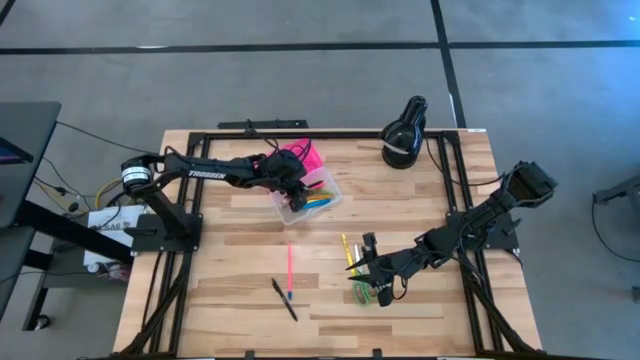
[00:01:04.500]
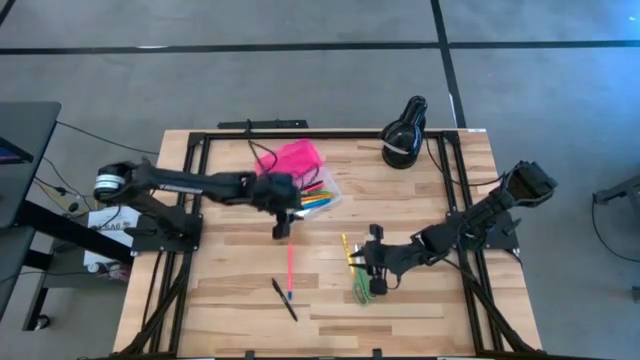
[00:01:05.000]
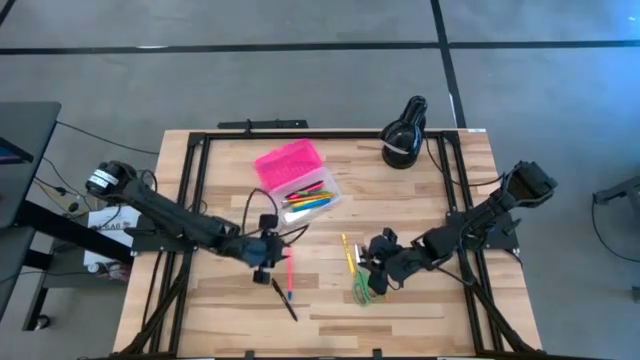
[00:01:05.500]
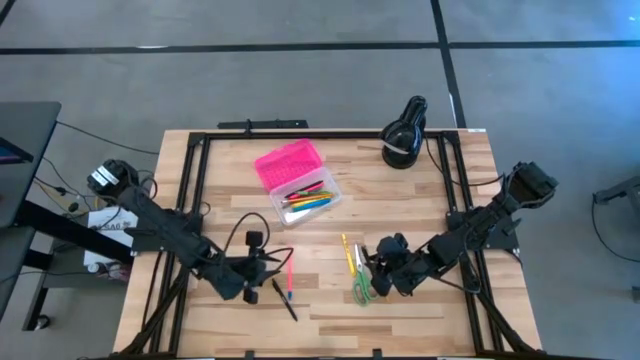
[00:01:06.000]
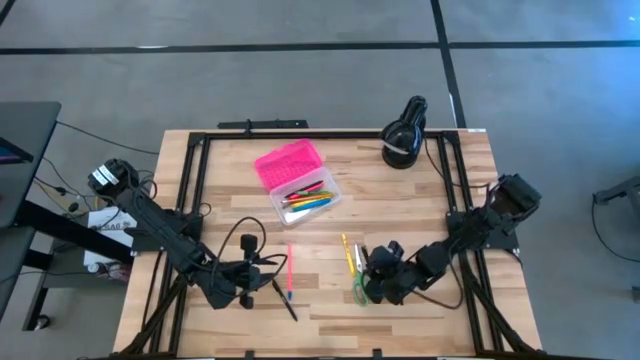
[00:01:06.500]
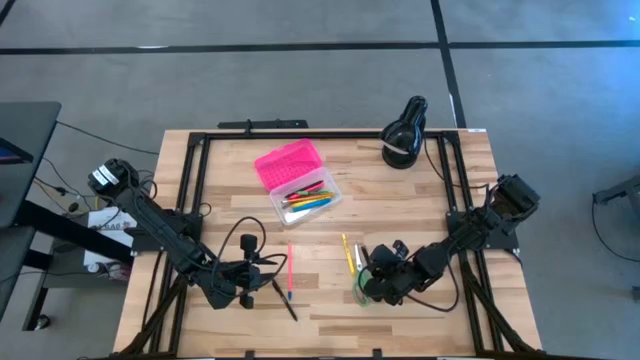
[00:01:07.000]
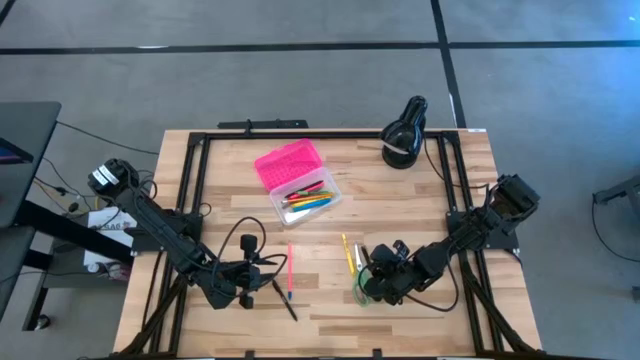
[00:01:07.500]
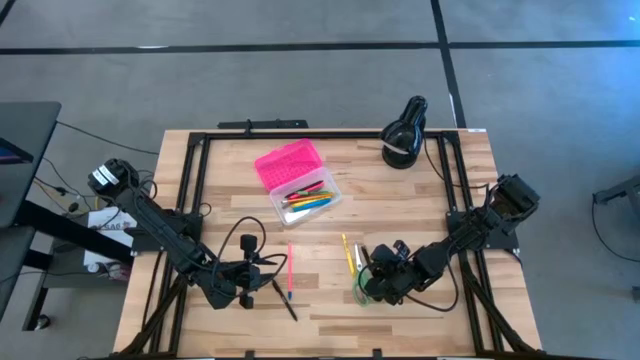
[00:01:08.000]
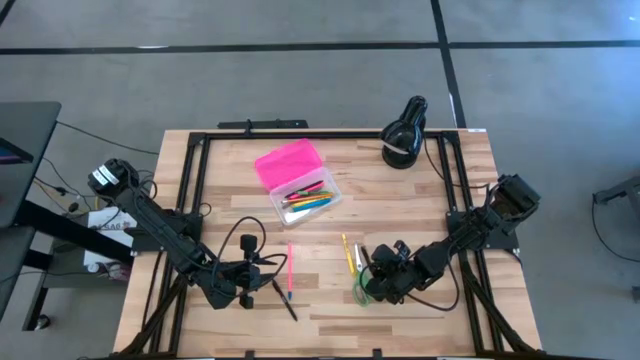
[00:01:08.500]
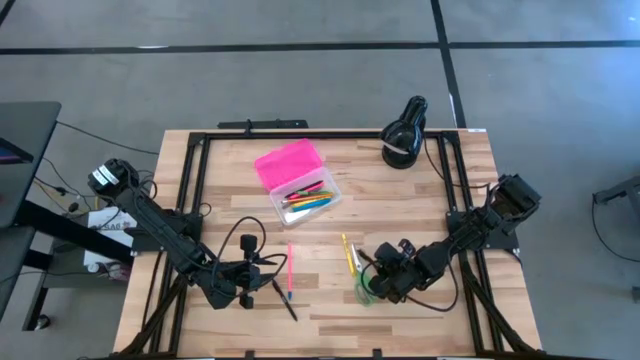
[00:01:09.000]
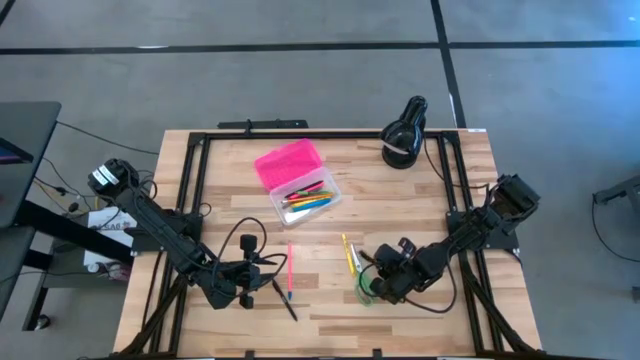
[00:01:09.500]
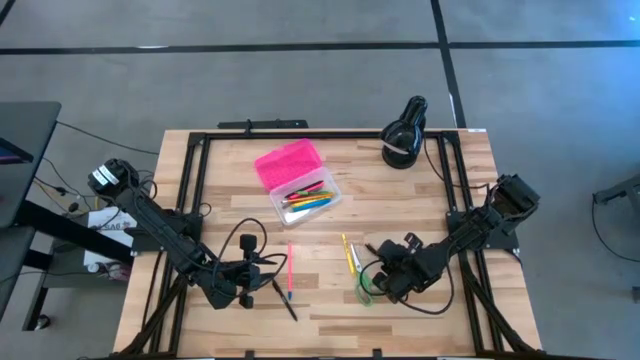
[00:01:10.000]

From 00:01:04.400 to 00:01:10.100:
Task: Pick & place school supplies into a supply box
Put the right black pen into the black supply box

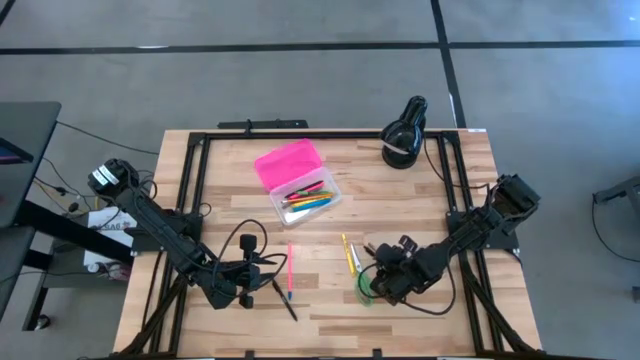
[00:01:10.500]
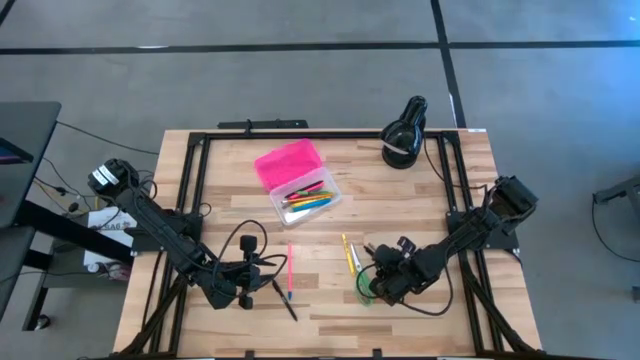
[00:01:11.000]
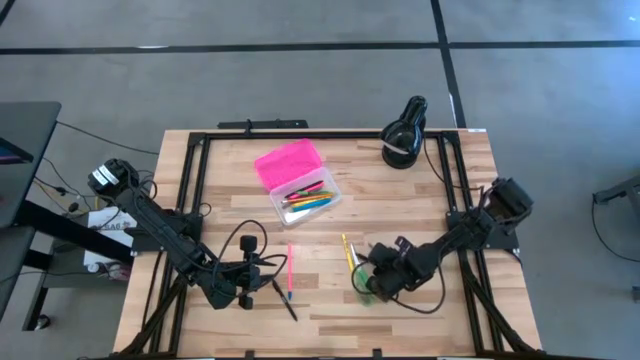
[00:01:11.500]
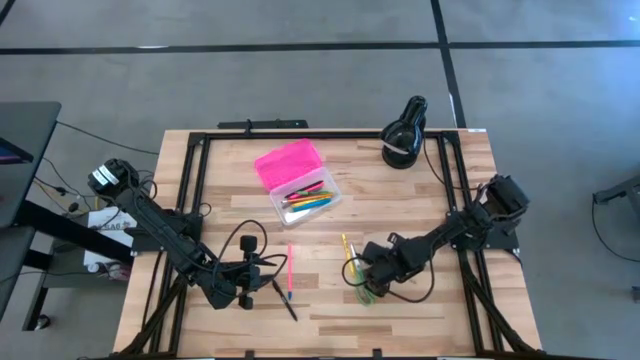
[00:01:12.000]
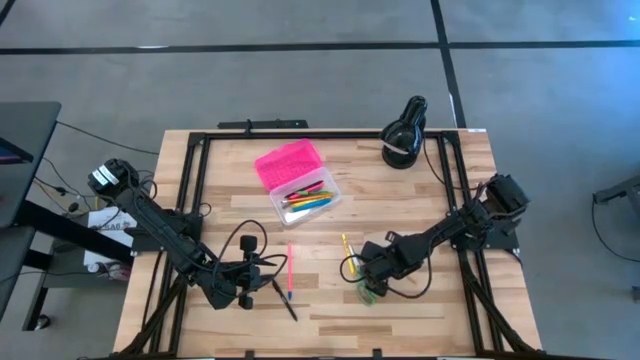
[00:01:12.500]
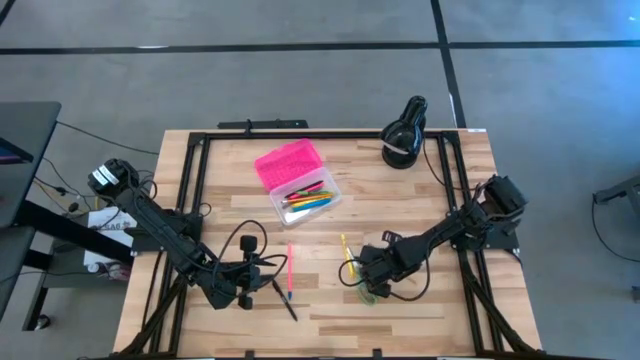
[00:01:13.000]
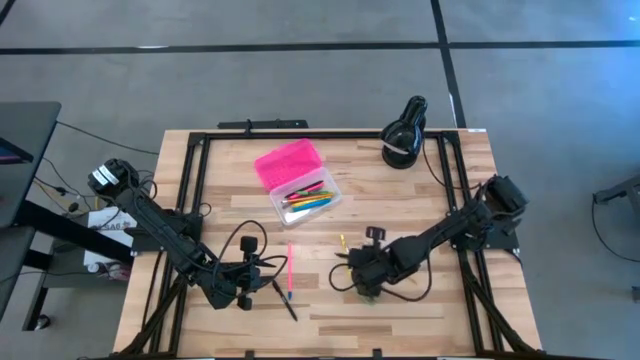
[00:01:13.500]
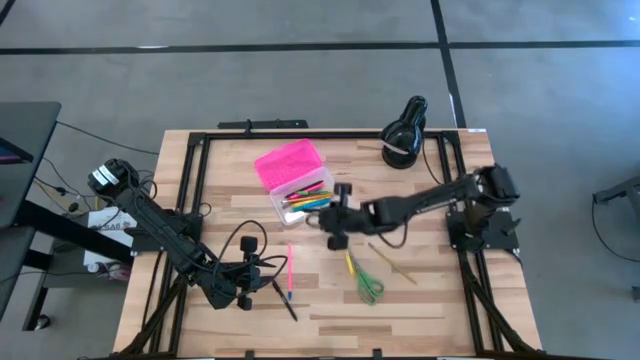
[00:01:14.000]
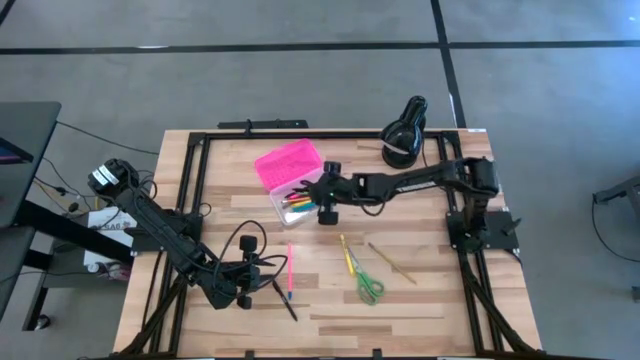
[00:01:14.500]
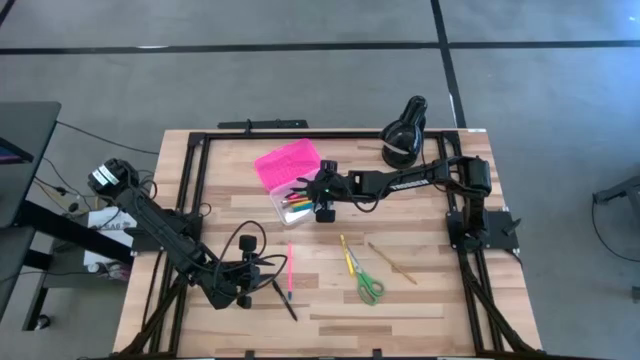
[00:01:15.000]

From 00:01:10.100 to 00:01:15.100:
Put the right black pen into the black supply box

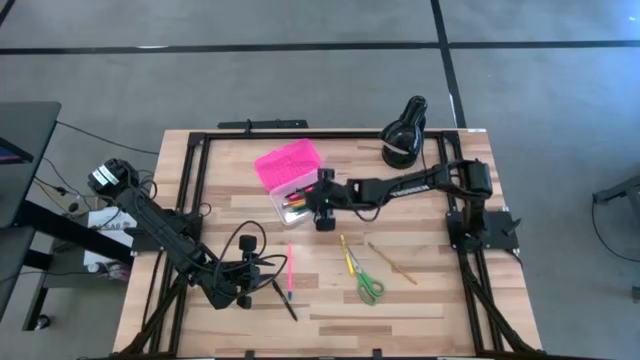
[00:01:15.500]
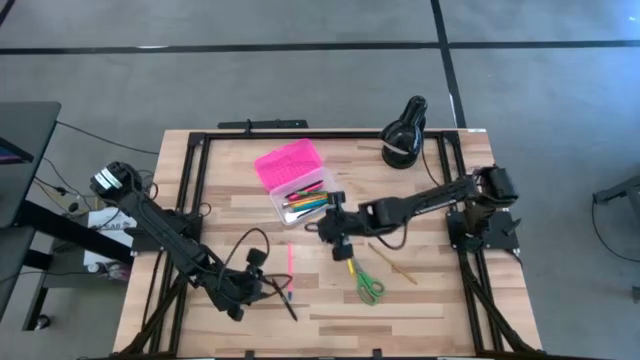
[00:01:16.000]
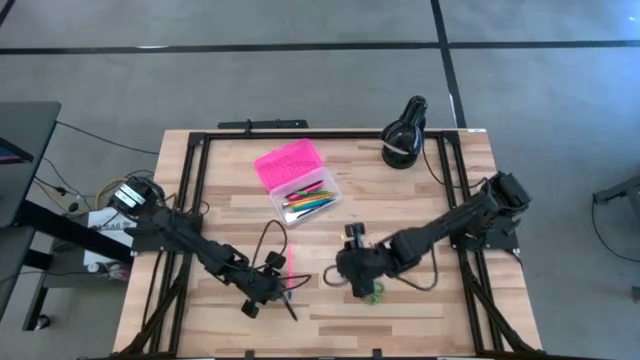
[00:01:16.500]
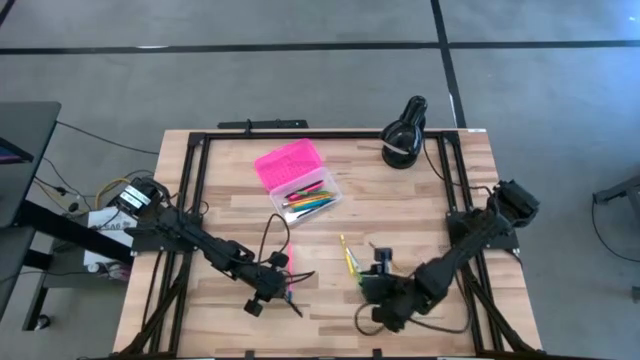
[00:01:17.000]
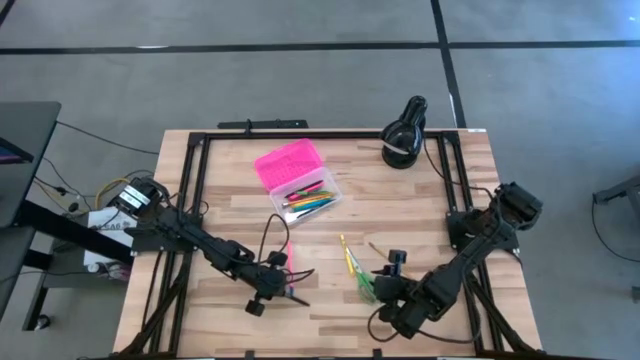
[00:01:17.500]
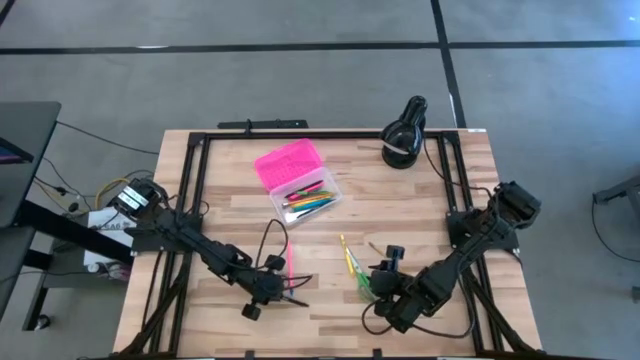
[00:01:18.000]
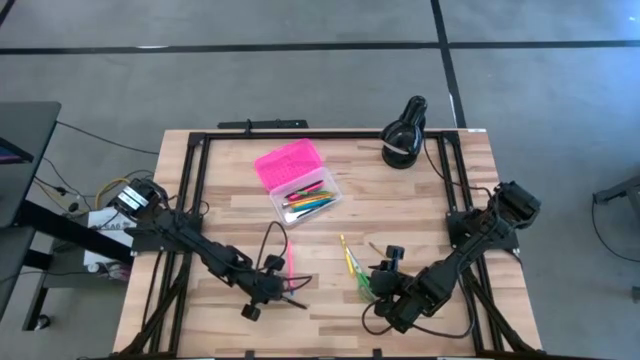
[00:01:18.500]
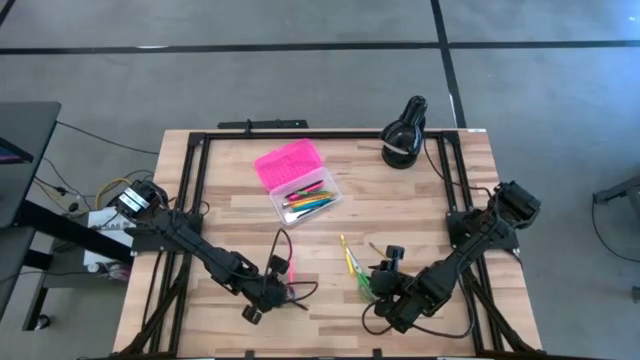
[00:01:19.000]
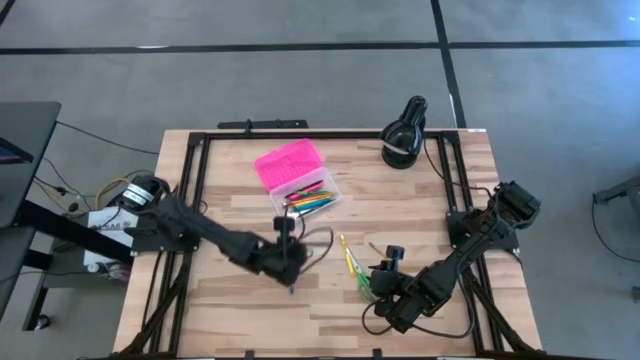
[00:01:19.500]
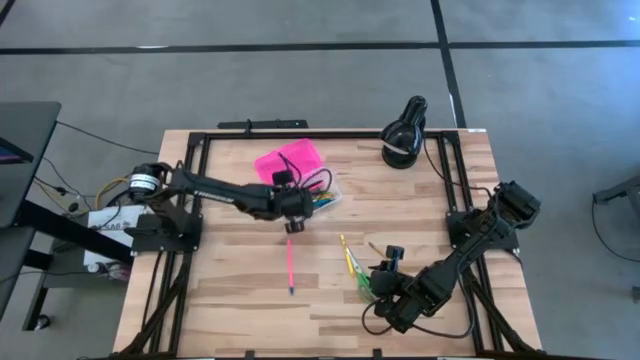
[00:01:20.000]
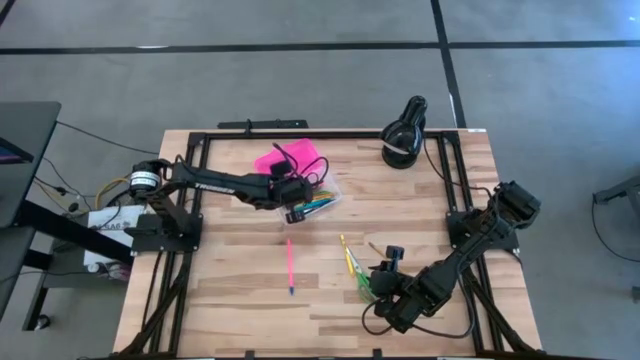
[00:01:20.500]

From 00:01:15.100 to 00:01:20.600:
Put the black pen into the black supply box

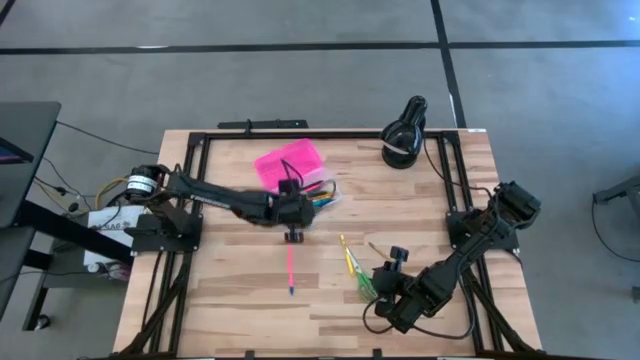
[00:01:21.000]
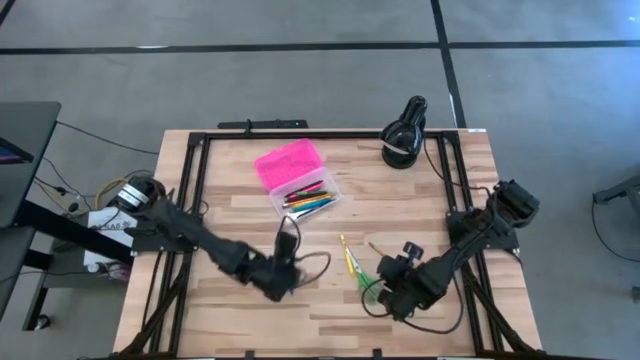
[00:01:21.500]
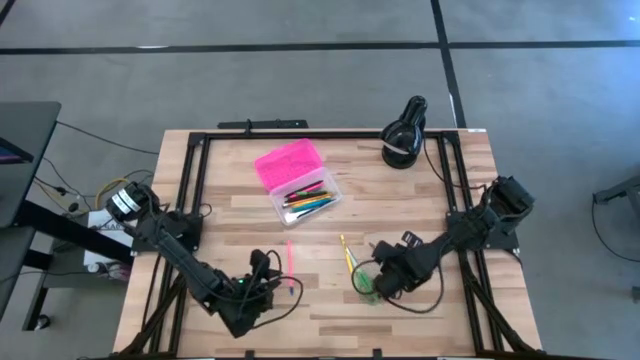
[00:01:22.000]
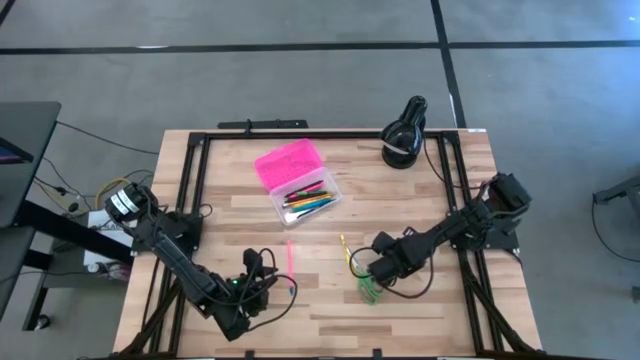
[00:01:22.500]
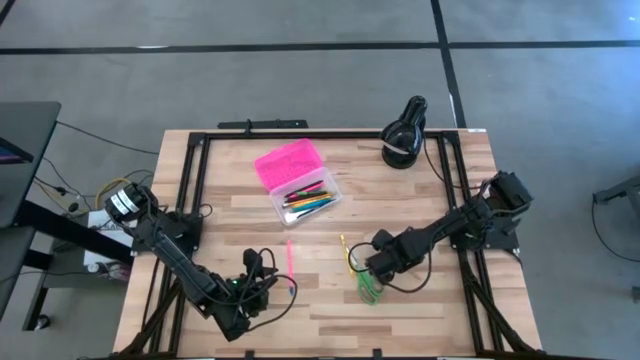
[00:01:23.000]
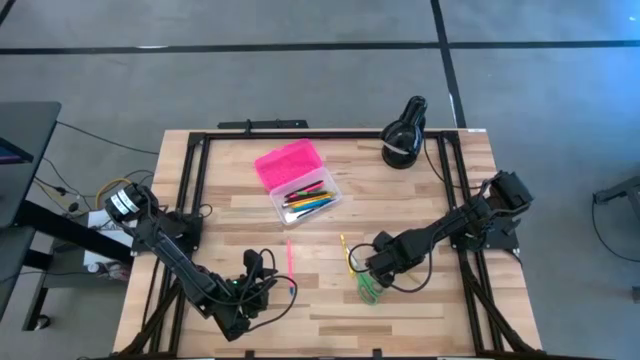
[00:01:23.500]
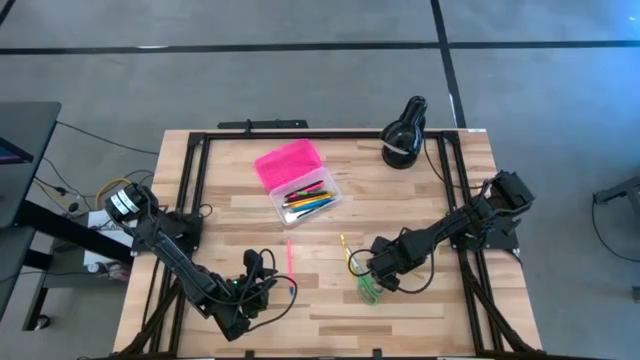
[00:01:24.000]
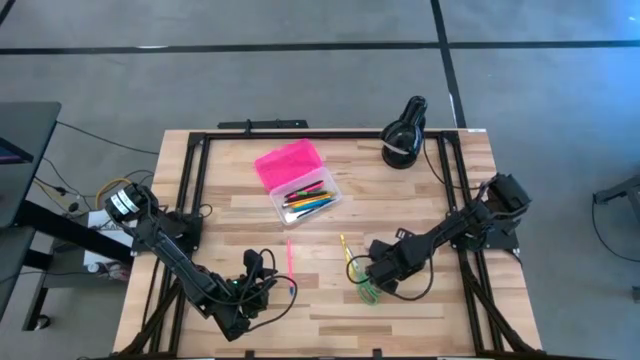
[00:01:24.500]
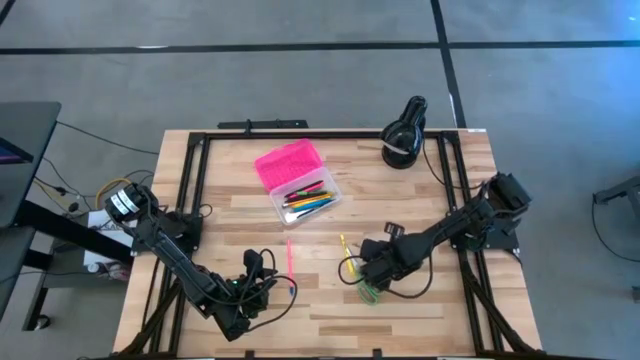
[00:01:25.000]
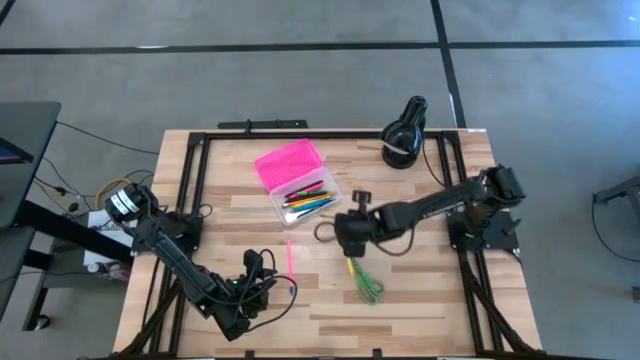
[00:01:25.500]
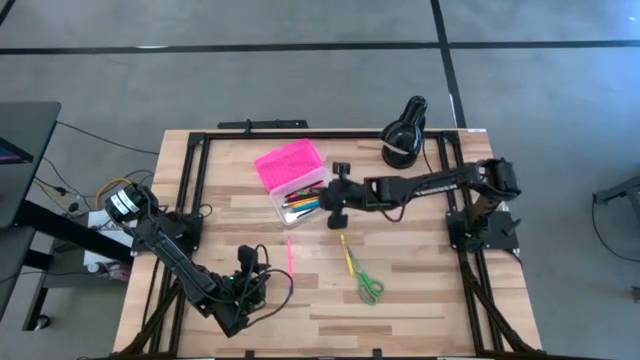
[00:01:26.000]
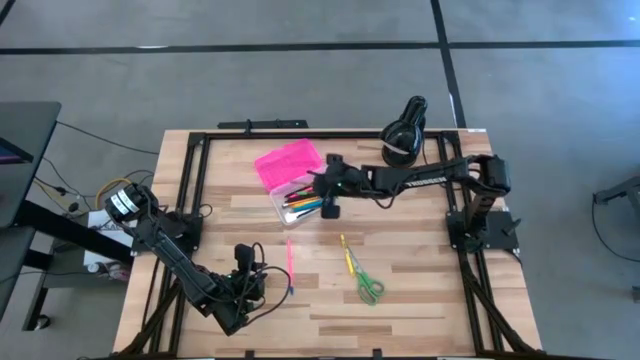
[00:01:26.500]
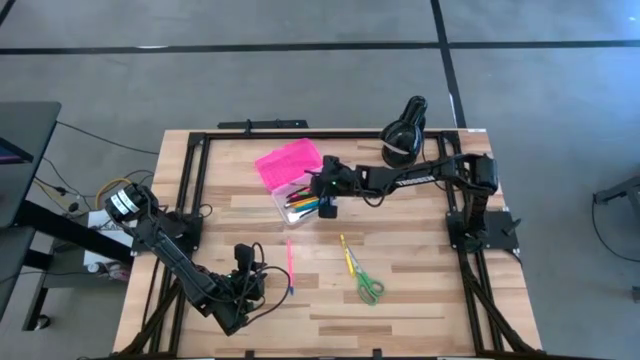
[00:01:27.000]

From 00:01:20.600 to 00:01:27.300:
Put the yellow pencil into the black supply box
